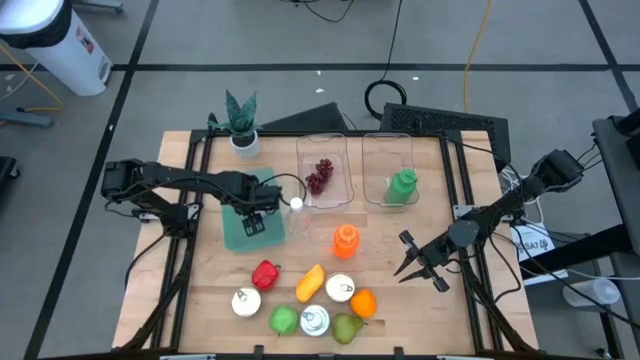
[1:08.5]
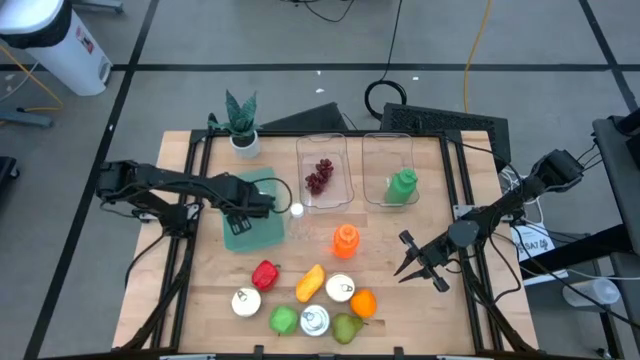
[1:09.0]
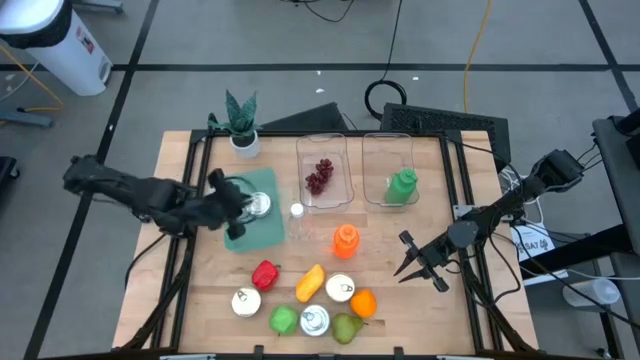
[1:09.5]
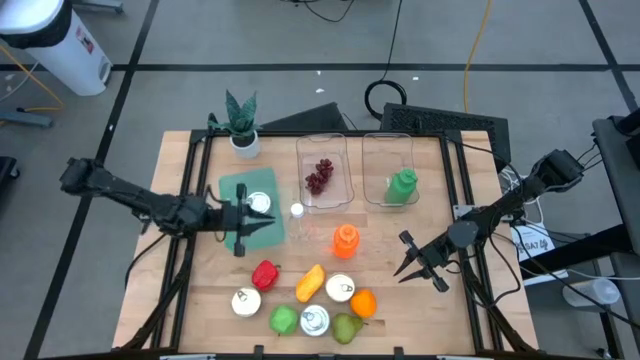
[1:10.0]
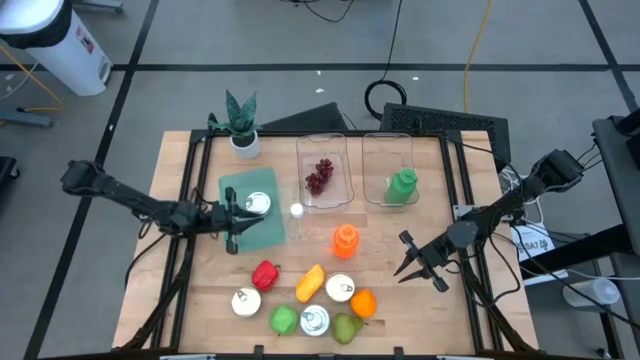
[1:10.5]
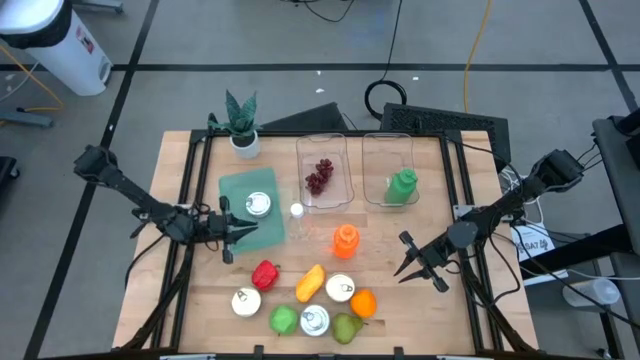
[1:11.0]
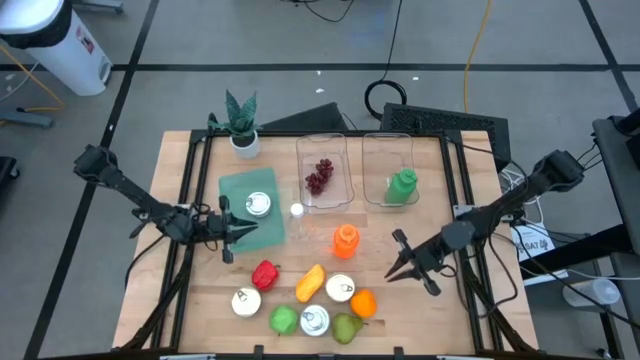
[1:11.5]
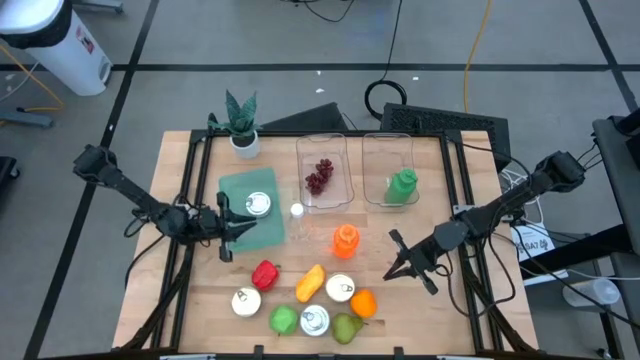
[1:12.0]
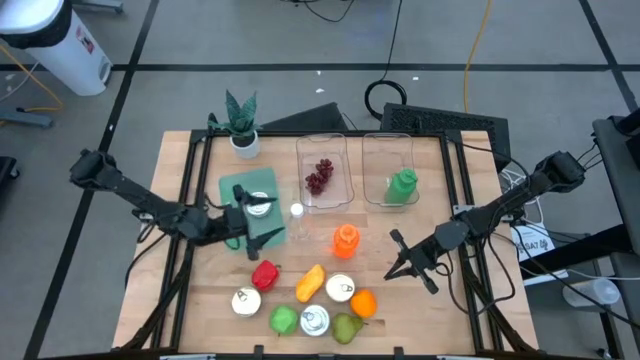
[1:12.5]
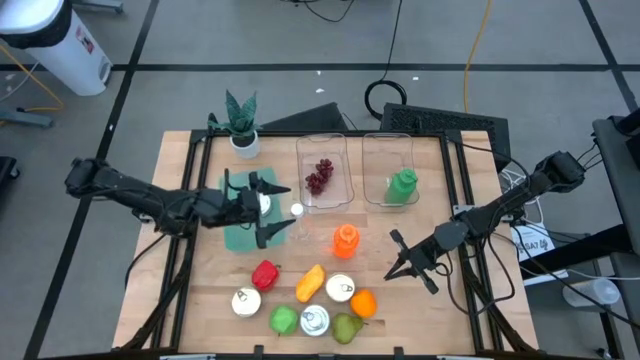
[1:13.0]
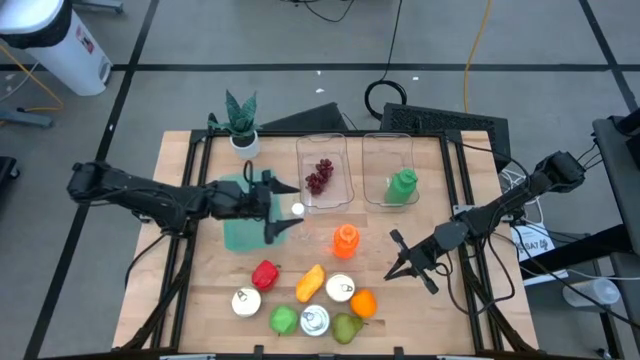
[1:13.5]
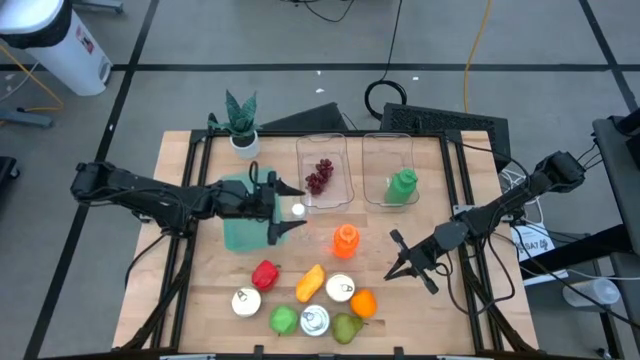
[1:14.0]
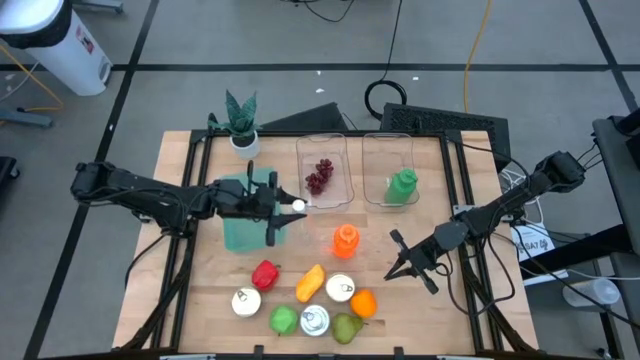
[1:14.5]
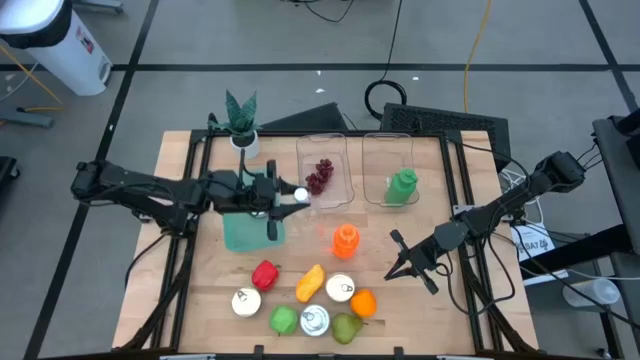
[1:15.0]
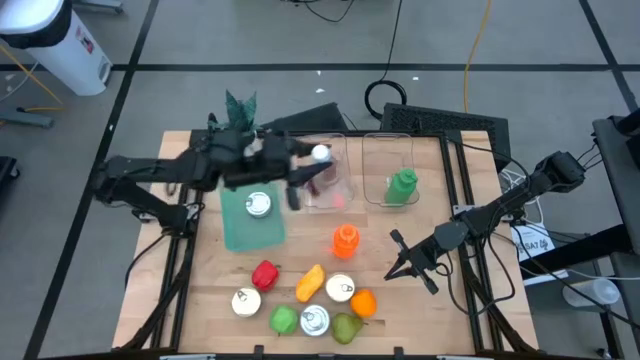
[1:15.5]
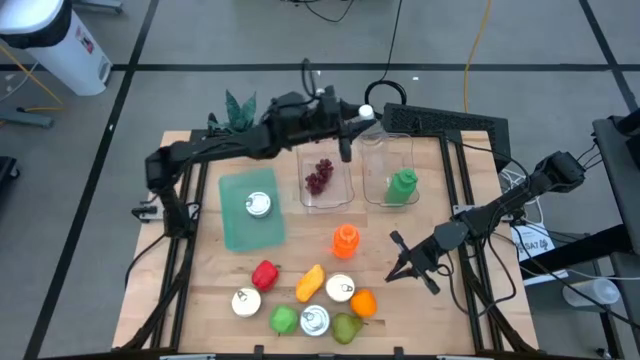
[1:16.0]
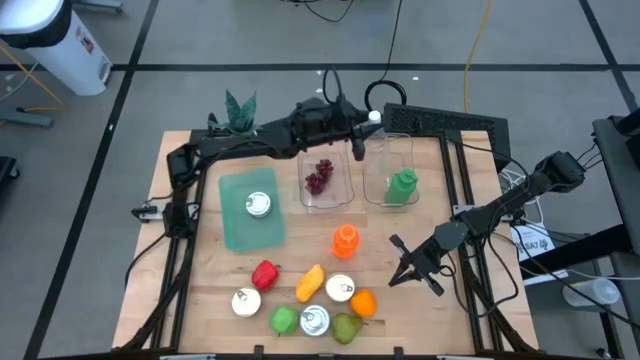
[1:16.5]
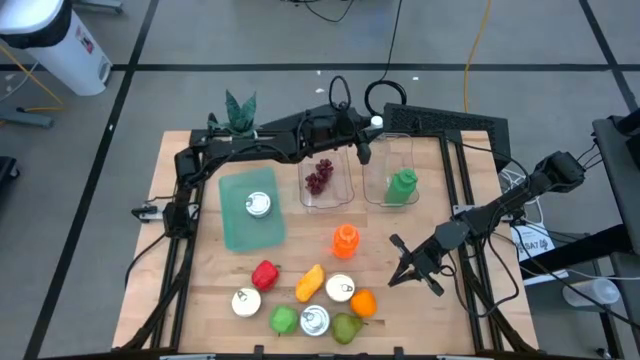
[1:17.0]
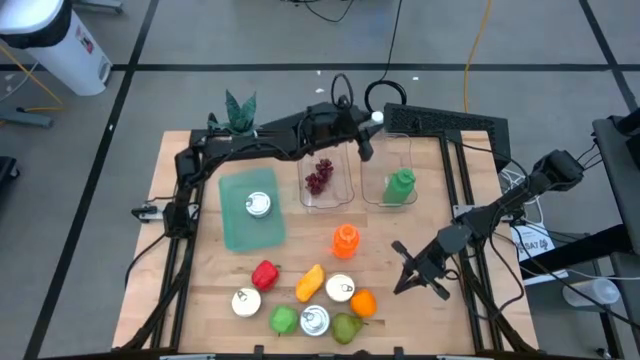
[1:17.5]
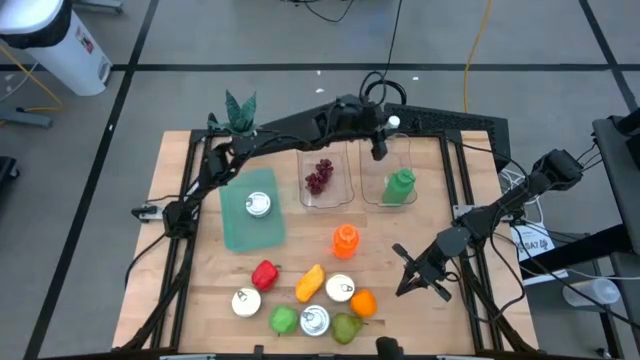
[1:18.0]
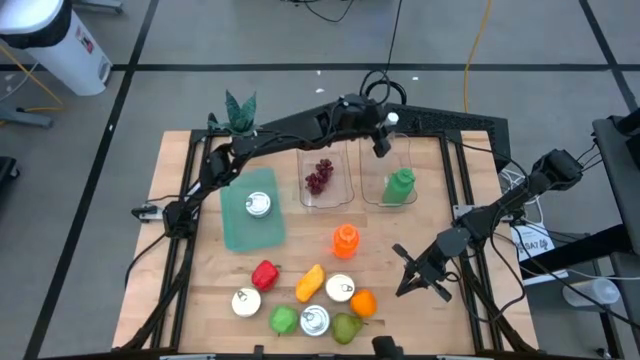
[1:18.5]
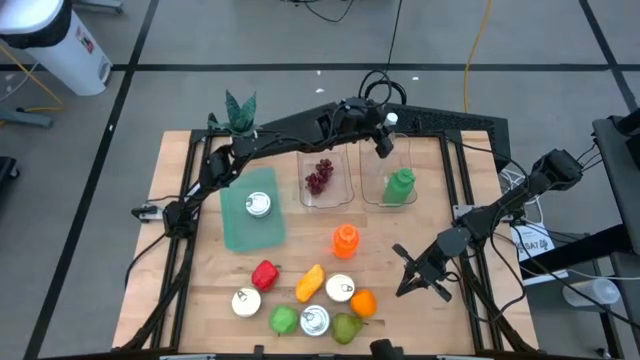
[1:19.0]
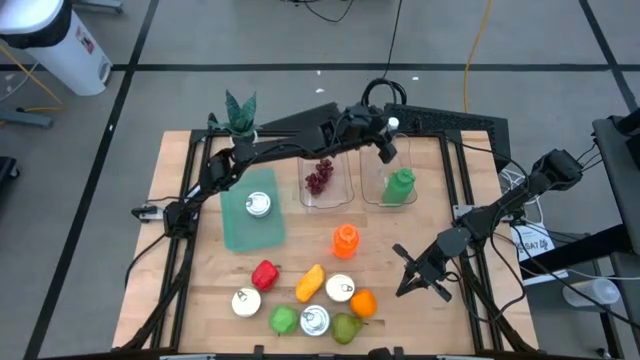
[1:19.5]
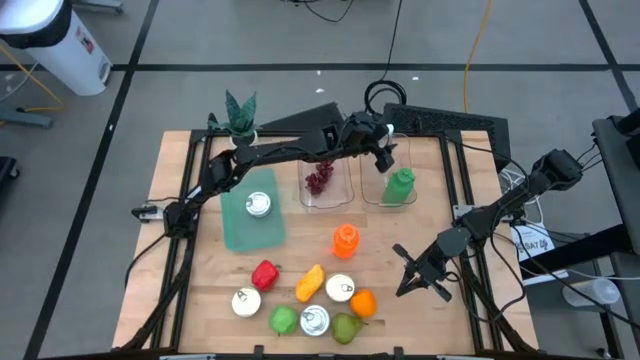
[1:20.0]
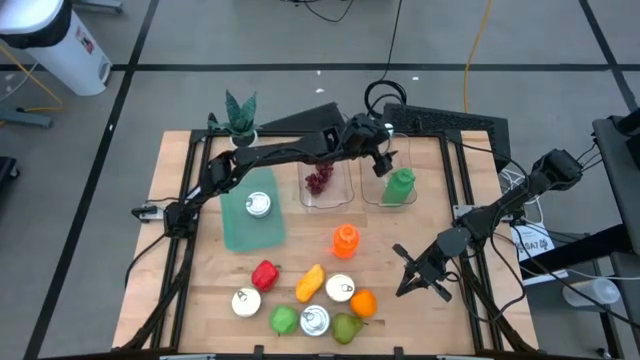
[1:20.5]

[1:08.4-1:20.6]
Task: Pick & Place Food Item
Put the transparent water bottle into the right transparent bin

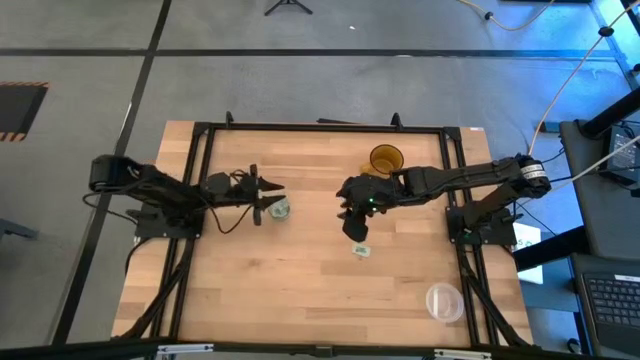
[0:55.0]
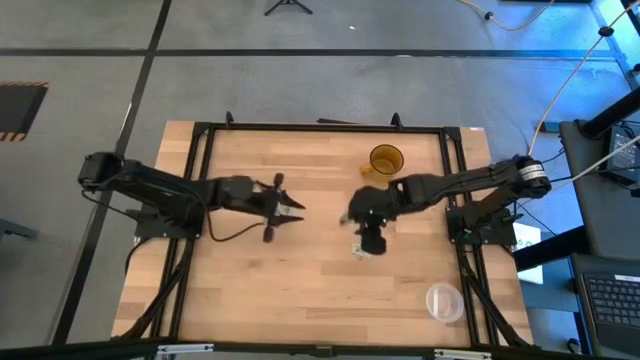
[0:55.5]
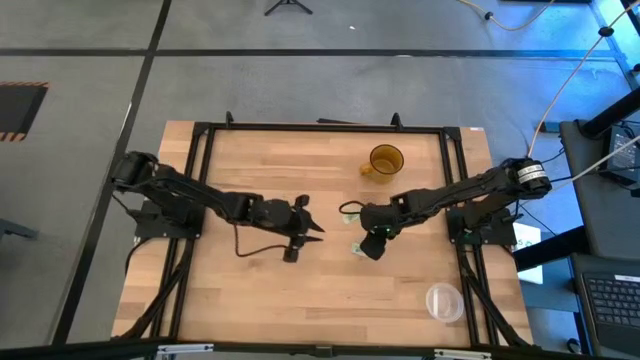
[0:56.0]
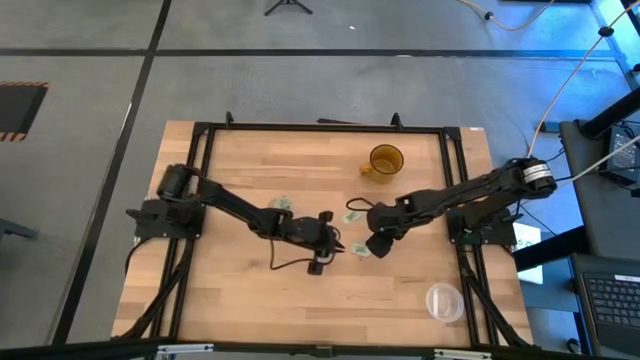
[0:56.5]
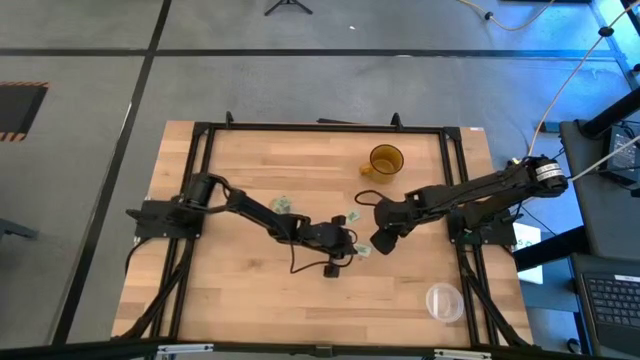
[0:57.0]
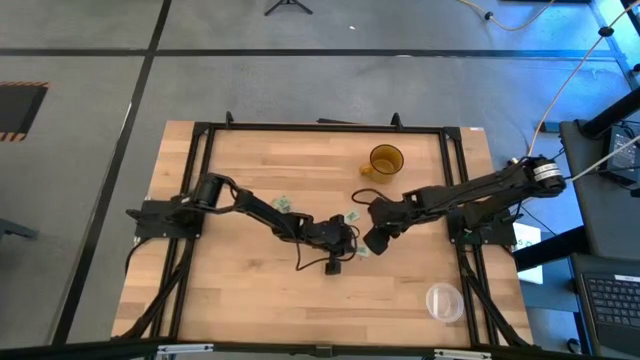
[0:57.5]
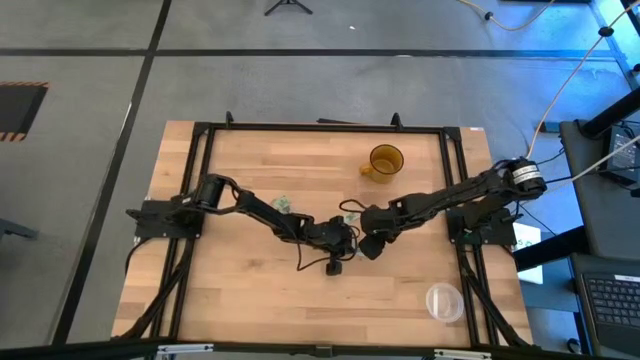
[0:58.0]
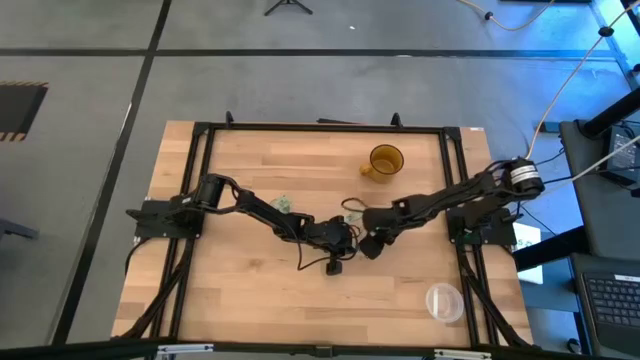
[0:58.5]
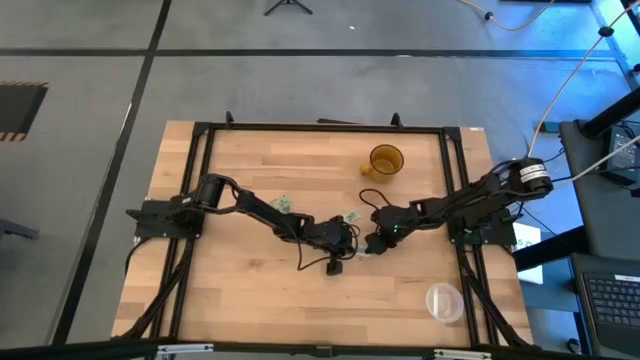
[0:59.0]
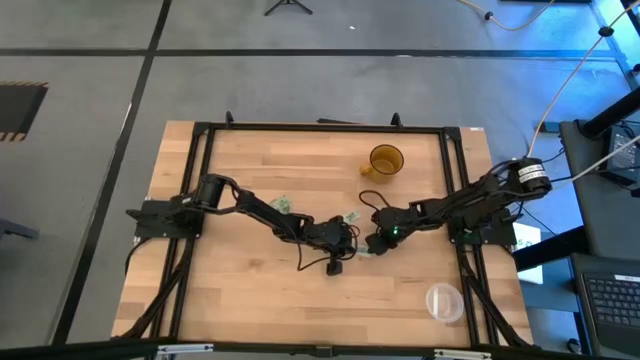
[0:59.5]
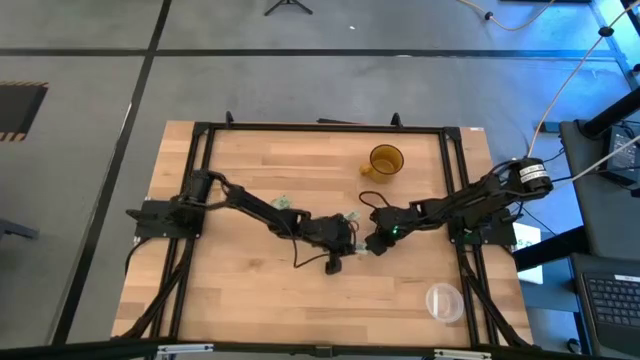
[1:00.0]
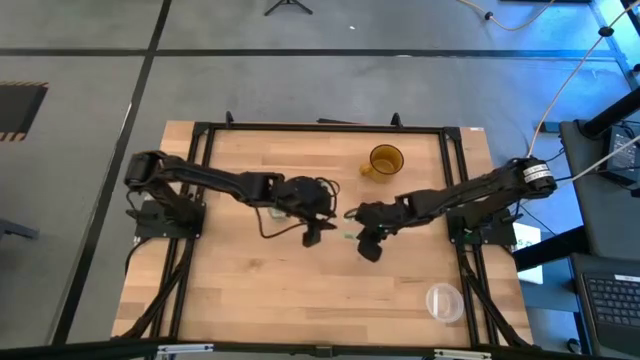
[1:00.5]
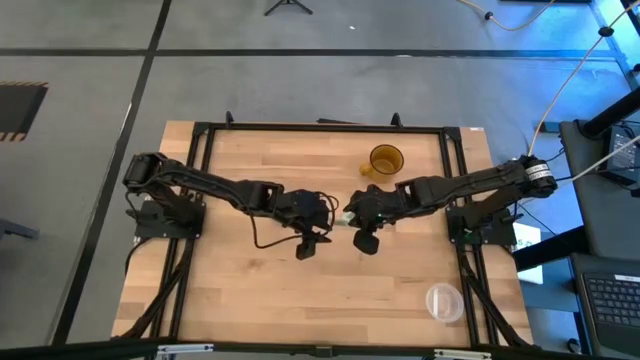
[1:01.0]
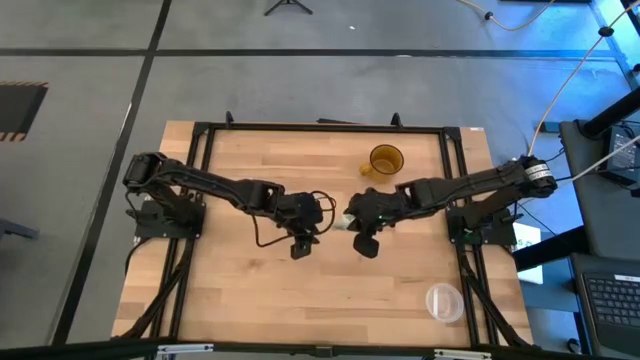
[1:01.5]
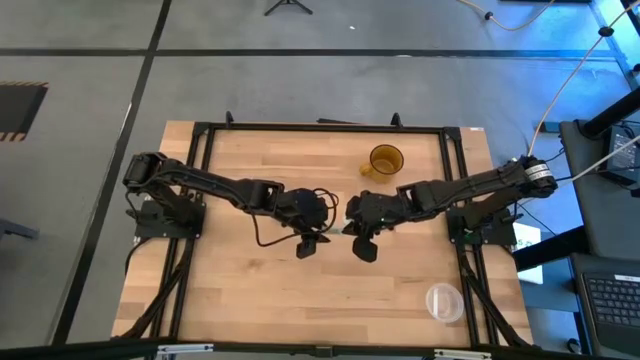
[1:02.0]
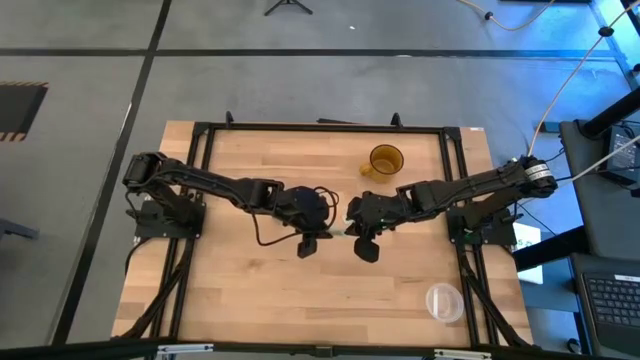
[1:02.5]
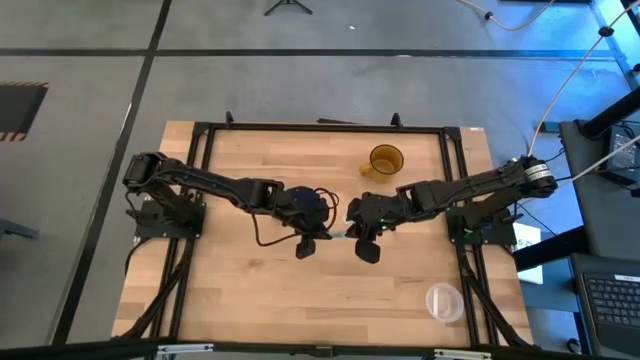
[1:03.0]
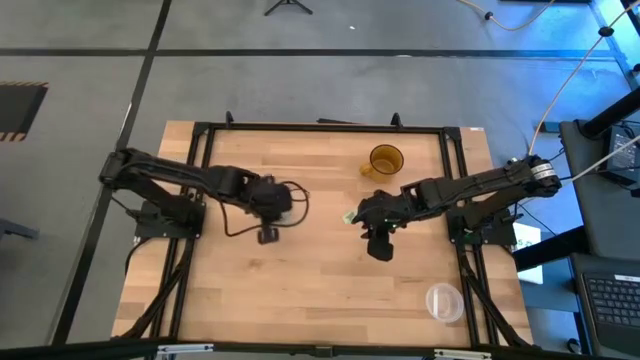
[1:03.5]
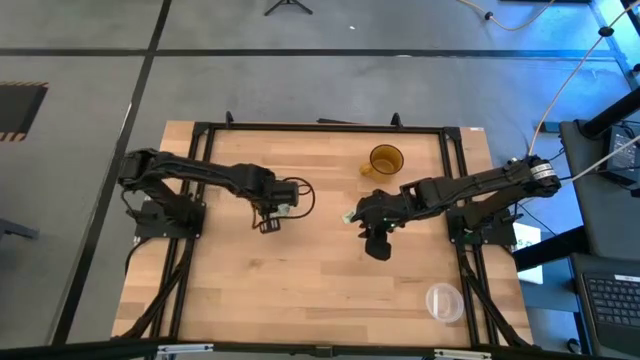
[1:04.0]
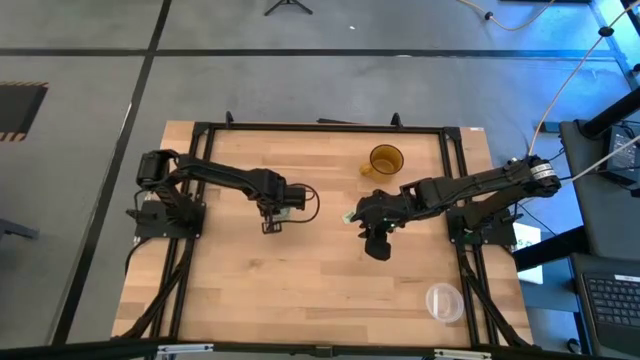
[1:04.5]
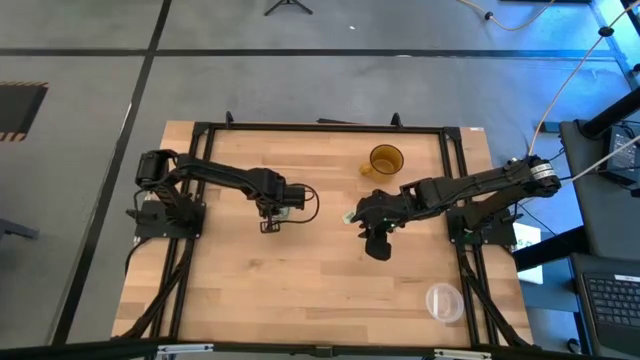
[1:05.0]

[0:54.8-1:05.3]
Task: Pick and place Stevia / Truvia into bins
Put the stevia packet into the transparent container
